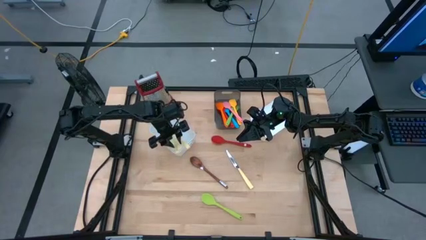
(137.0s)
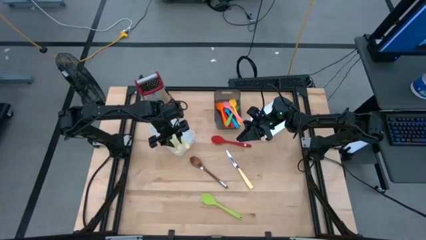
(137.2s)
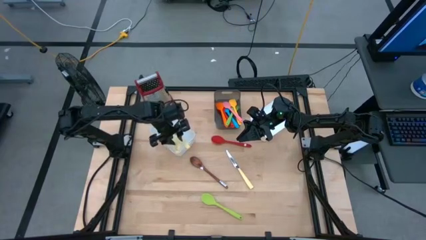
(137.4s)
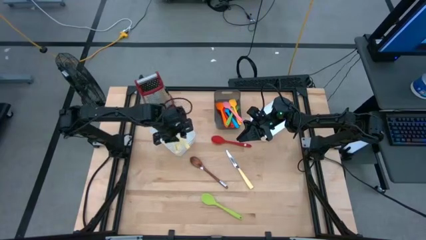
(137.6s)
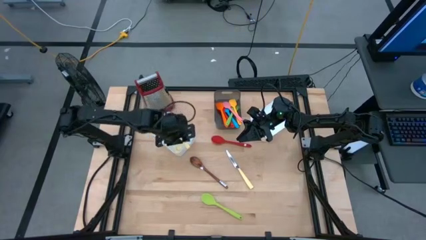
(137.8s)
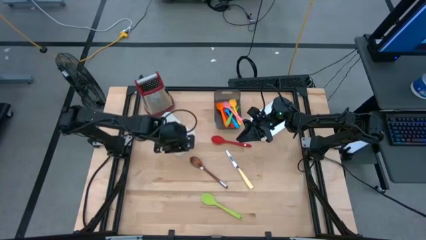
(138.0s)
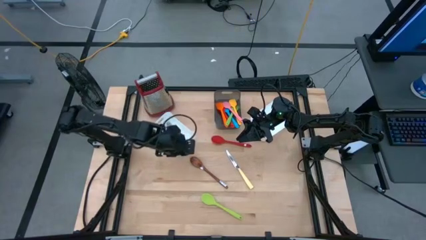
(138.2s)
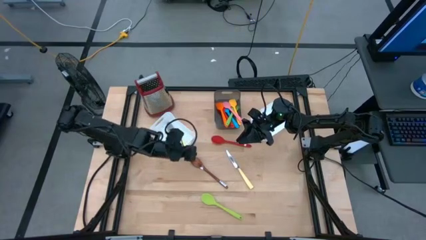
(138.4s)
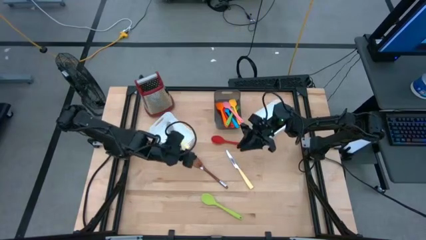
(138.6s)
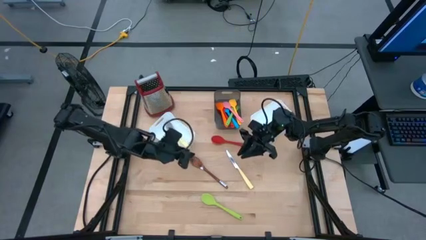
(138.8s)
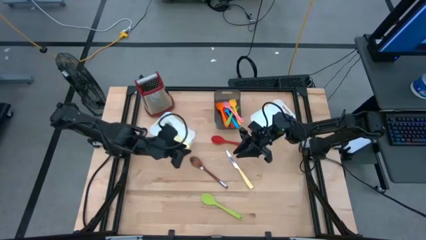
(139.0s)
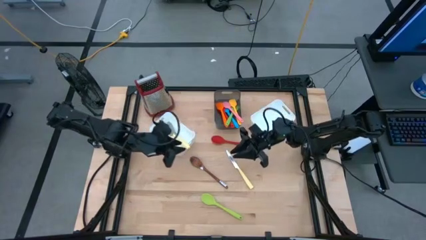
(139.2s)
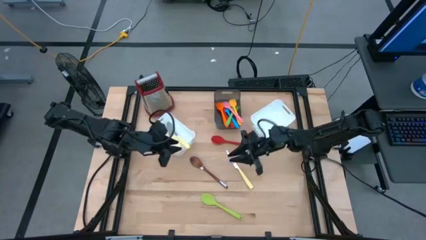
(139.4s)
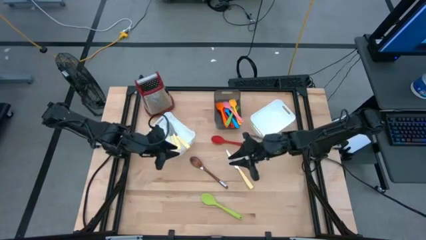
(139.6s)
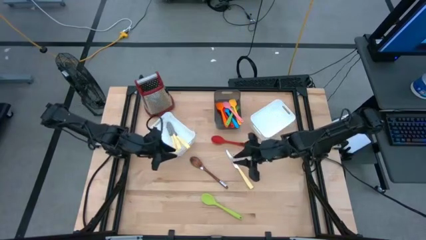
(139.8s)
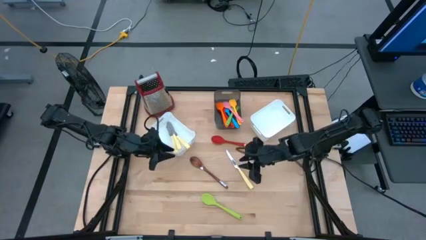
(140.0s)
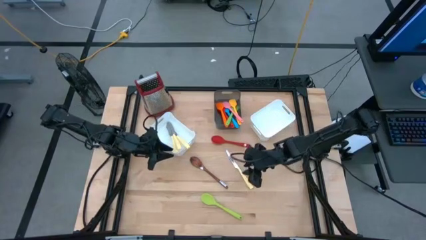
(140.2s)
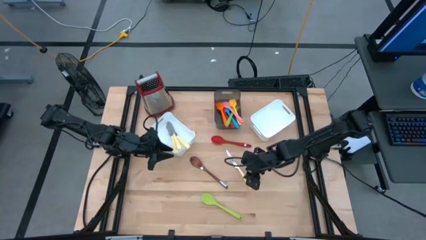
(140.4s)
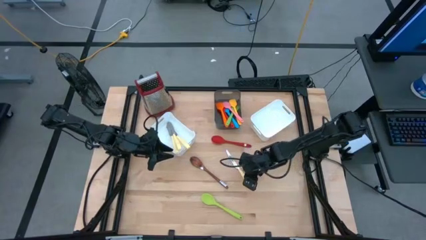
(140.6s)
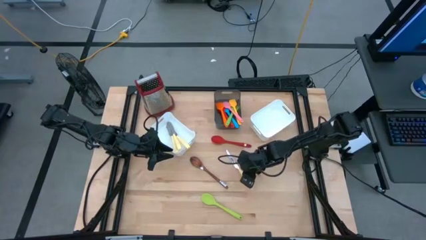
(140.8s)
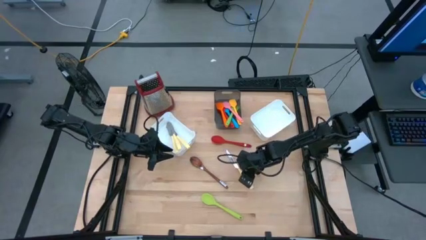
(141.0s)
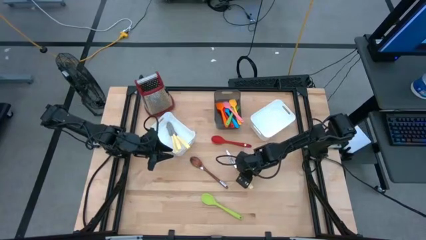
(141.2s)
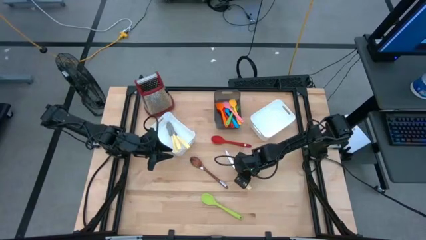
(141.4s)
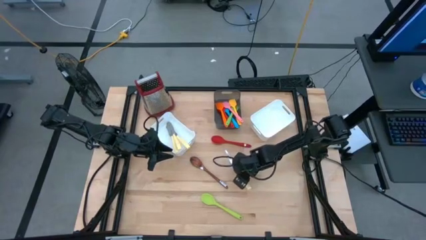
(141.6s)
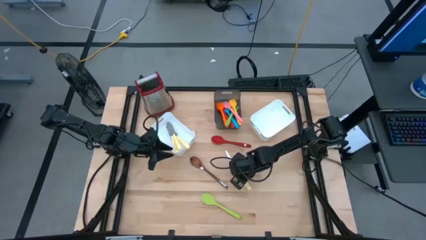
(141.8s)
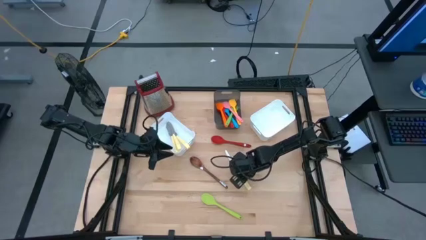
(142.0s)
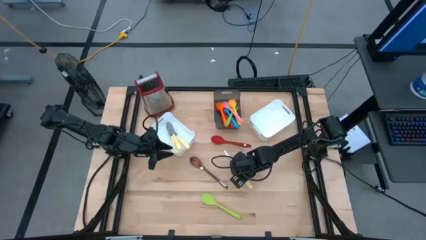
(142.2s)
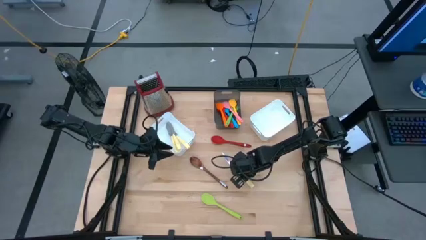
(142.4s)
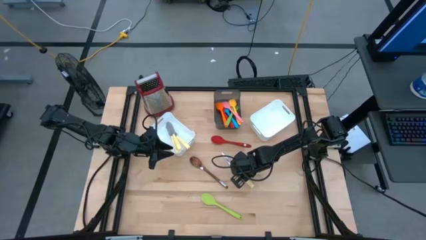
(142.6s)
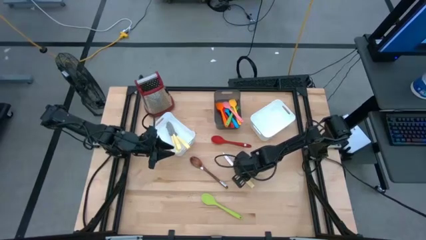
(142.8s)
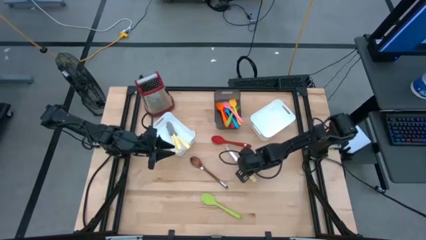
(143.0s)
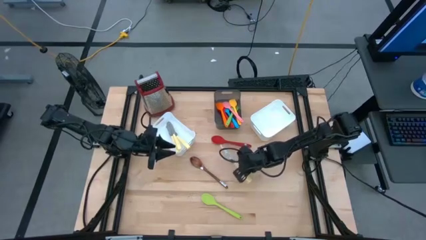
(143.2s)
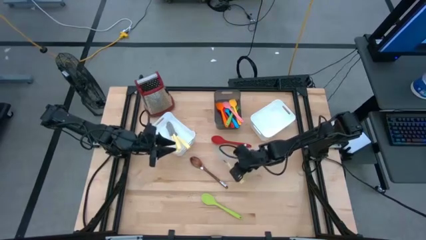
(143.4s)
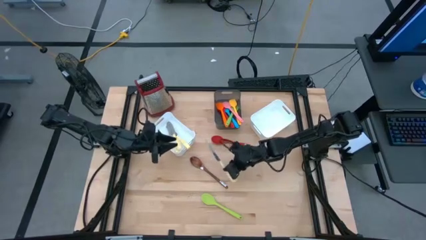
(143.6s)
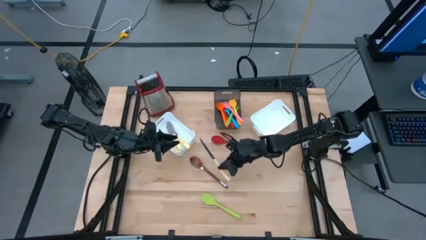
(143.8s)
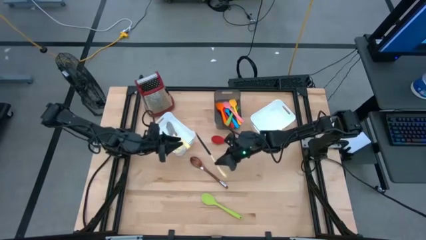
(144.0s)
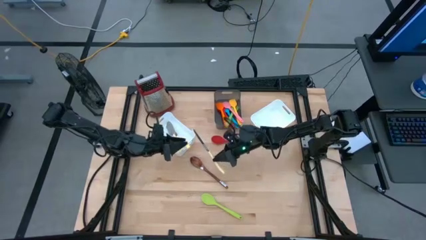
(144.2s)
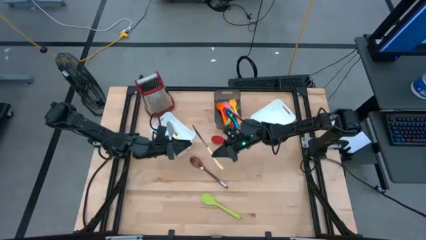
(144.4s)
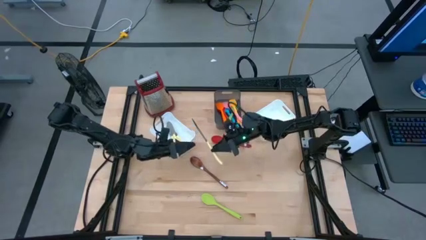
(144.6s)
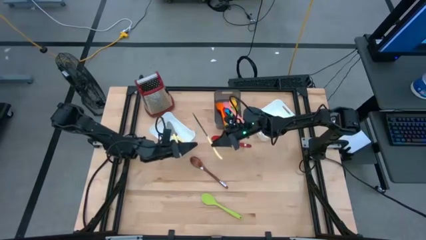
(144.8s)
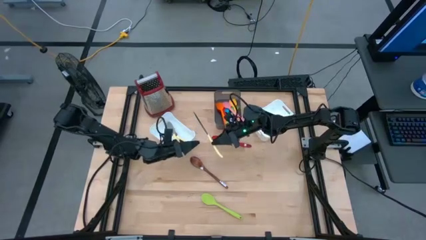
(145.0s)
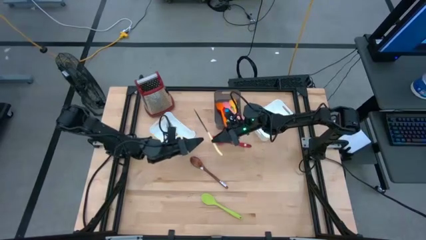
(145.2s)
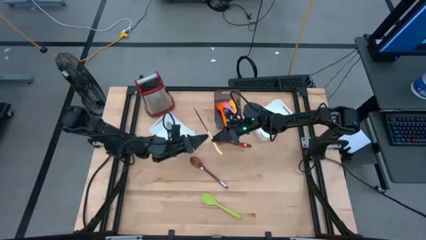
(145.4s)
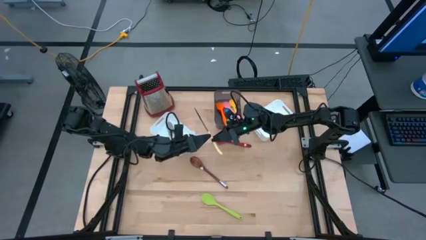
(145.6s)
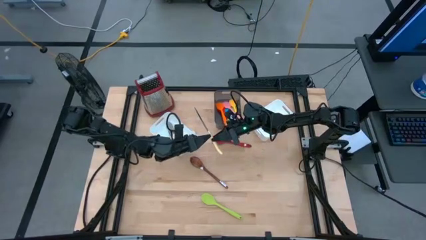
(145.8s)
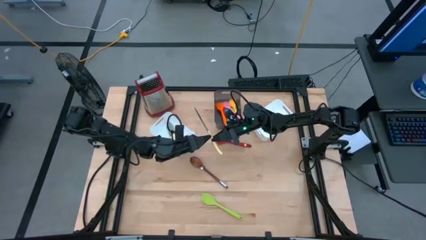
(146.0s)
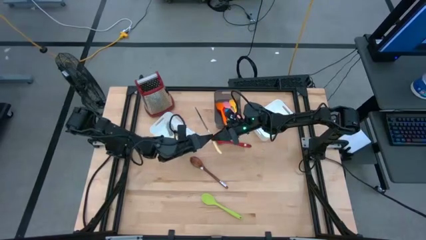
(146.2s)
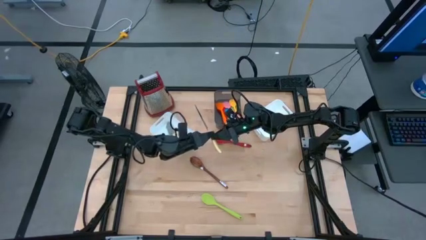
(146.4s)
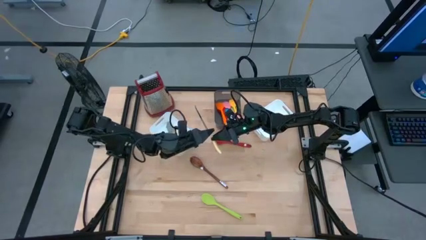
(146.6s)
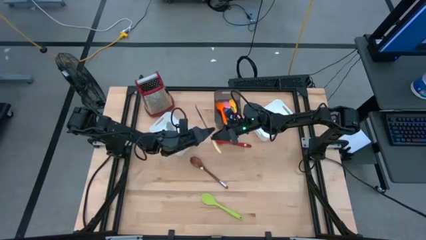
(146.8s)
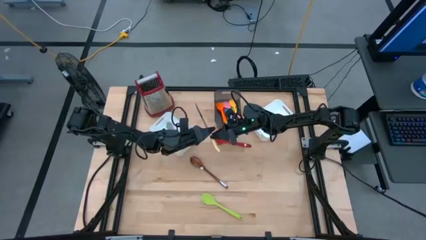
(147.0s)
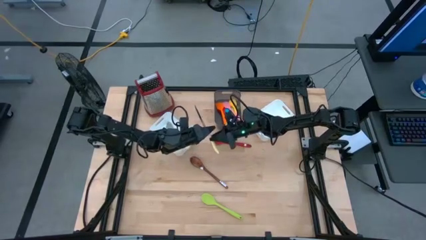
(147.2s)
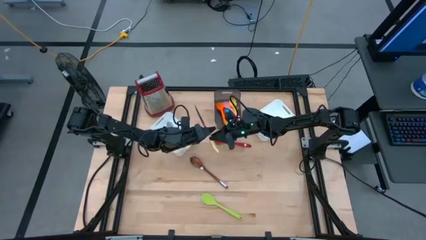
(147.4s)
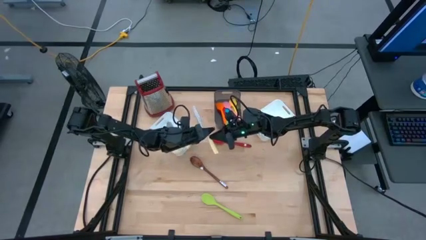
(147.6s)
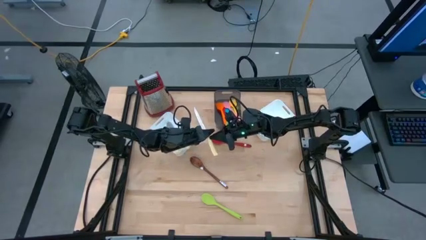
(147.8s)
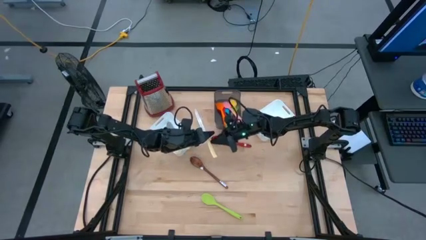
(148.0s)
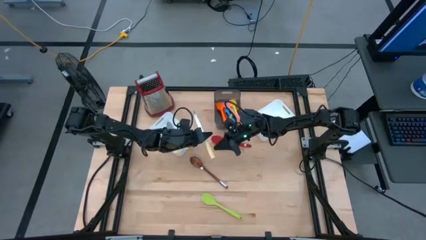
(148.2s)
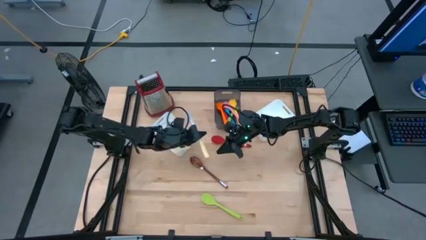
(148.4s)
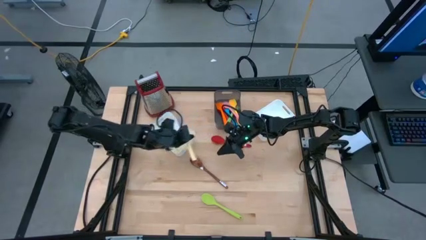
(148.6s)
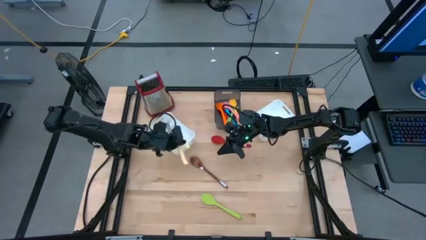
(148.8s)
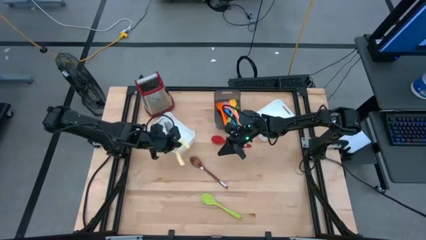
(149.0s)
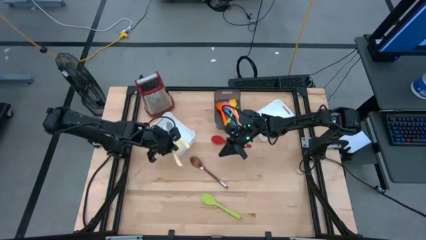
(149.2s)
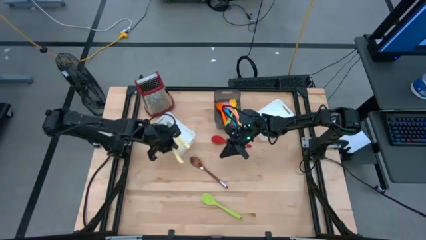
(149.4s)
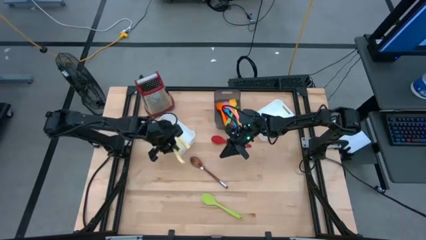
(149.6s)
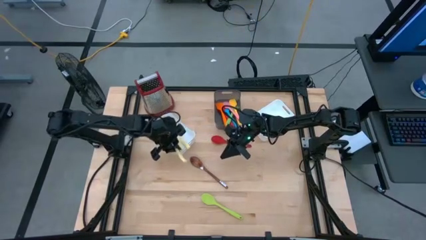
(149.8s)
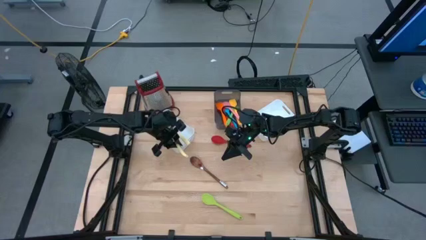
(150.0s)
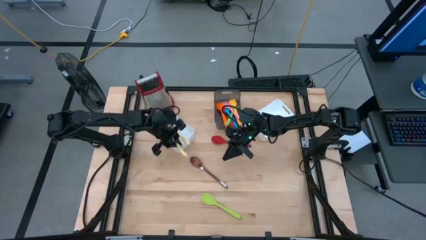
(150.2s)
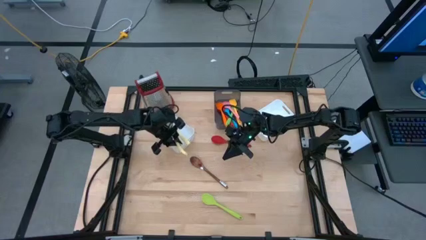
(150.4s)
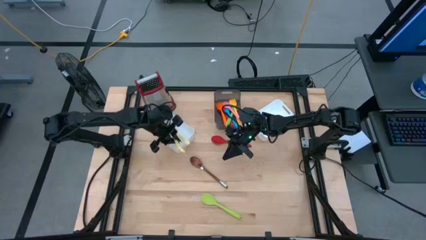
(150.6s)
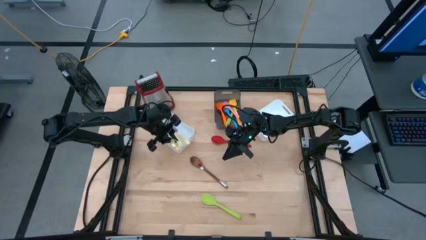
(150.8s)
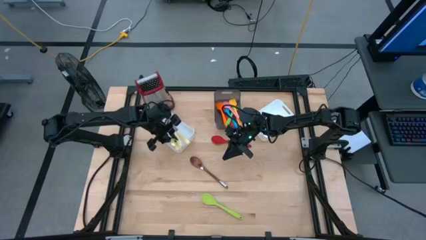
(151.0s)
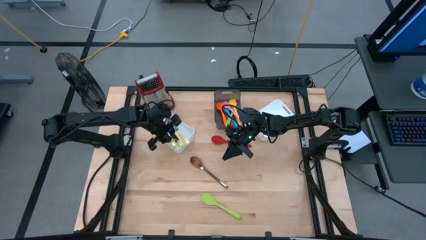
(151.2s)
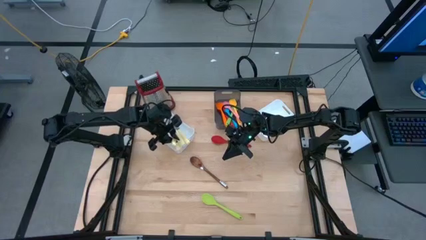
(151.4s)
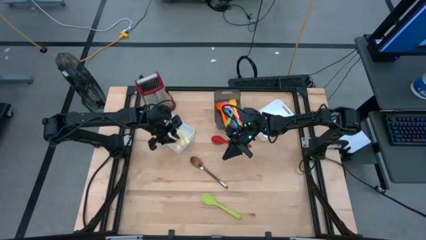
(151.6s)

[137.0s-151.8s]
Task: Pick & Place Kitchen Items
Put the yellow table knife into the left white bin
